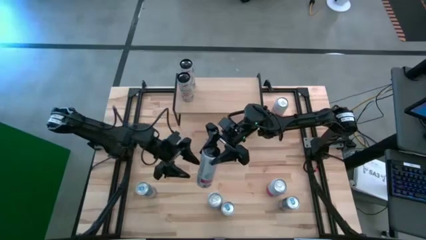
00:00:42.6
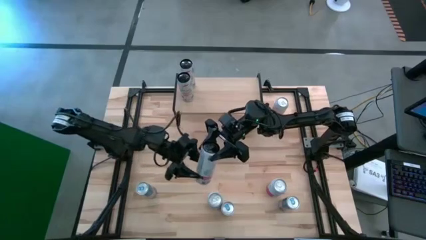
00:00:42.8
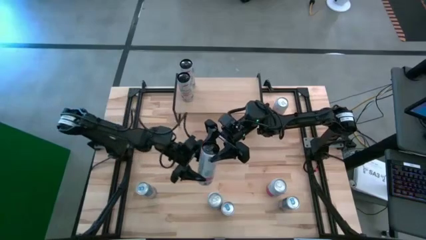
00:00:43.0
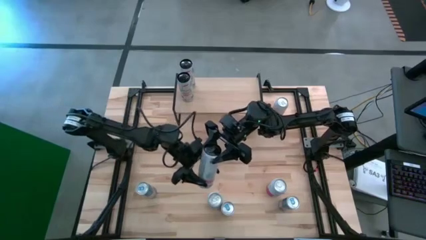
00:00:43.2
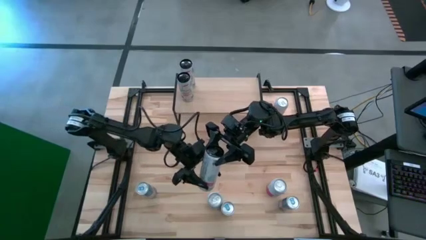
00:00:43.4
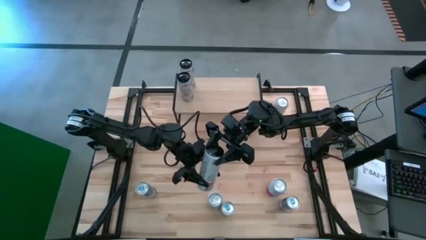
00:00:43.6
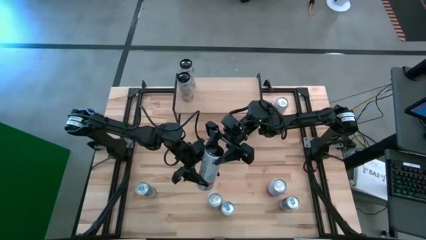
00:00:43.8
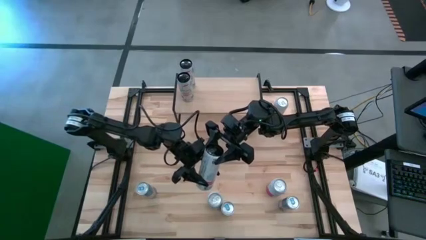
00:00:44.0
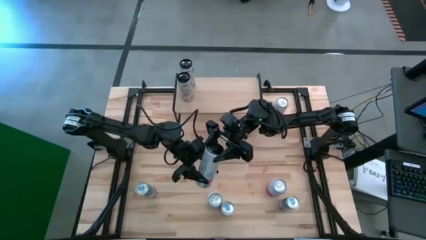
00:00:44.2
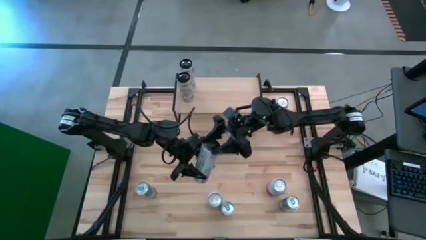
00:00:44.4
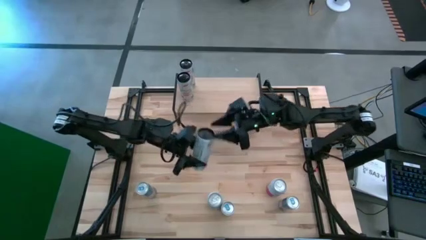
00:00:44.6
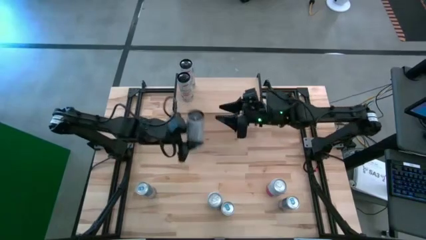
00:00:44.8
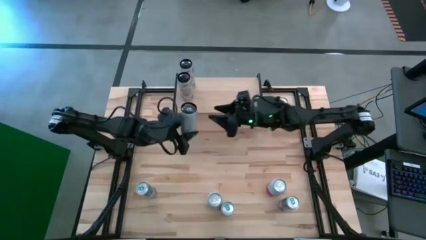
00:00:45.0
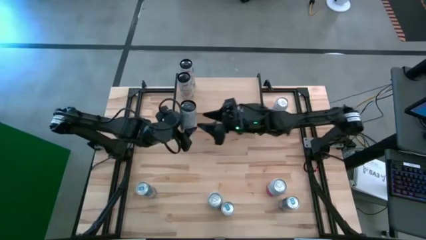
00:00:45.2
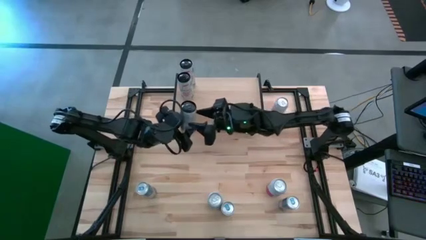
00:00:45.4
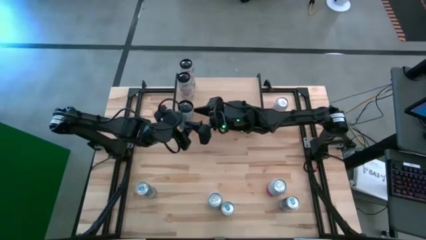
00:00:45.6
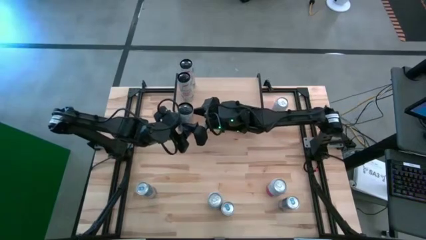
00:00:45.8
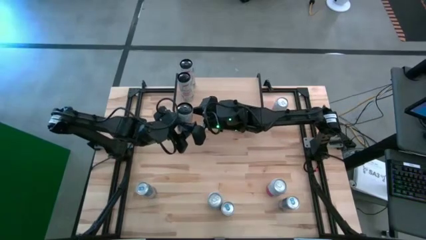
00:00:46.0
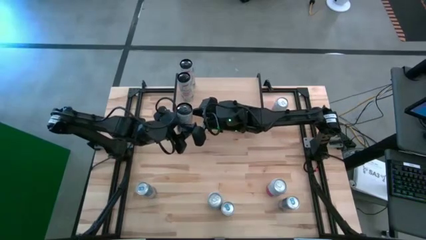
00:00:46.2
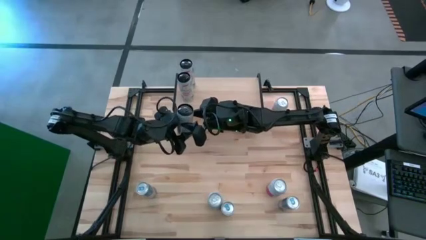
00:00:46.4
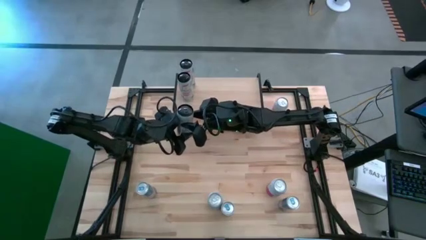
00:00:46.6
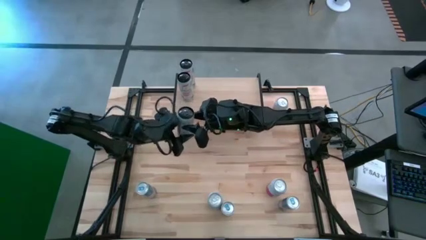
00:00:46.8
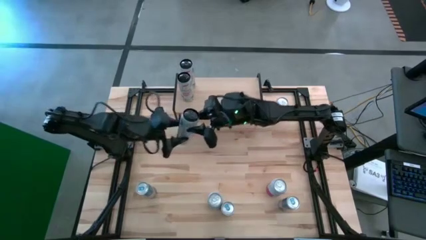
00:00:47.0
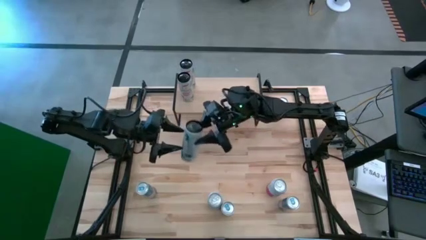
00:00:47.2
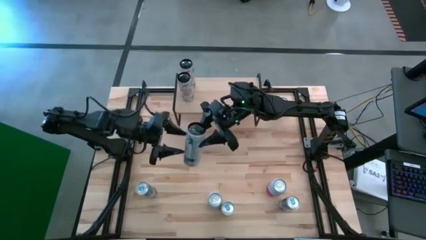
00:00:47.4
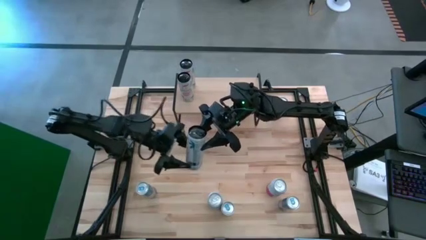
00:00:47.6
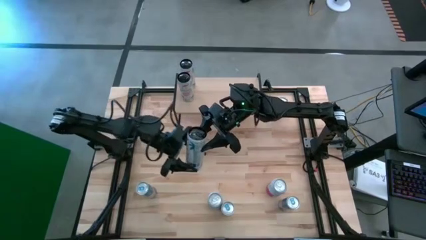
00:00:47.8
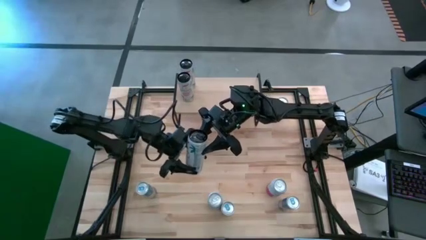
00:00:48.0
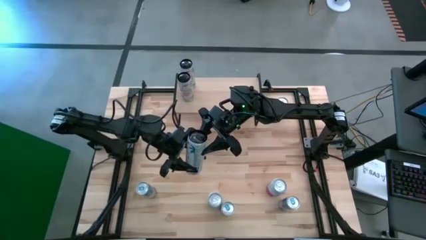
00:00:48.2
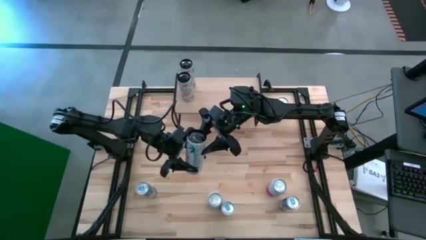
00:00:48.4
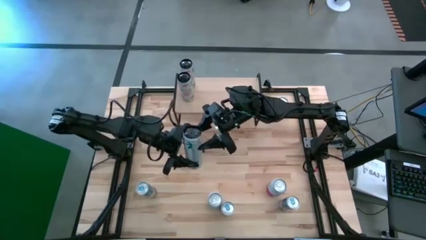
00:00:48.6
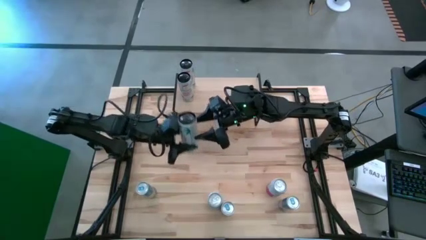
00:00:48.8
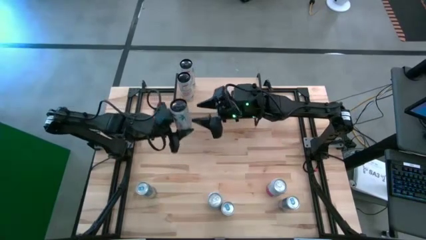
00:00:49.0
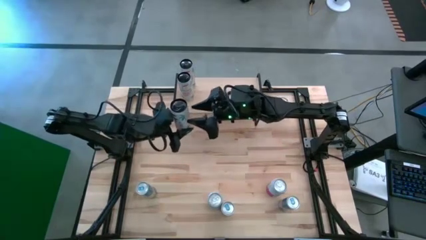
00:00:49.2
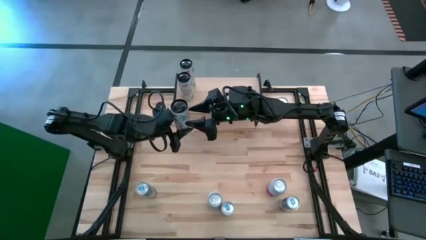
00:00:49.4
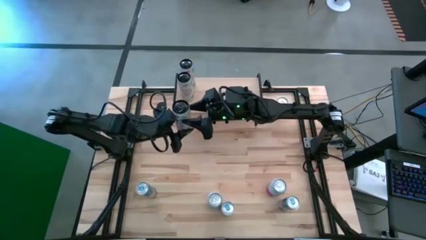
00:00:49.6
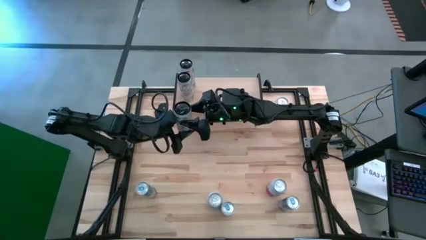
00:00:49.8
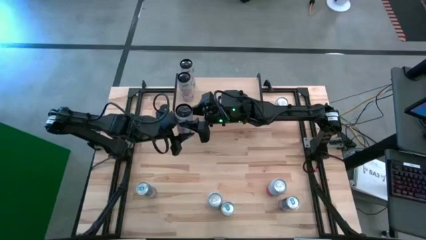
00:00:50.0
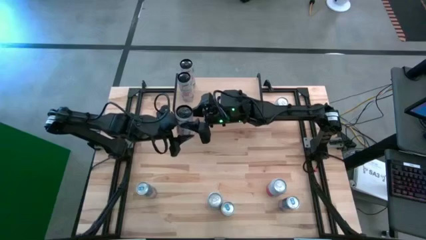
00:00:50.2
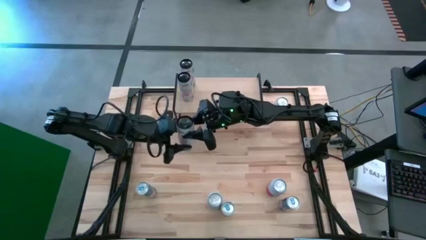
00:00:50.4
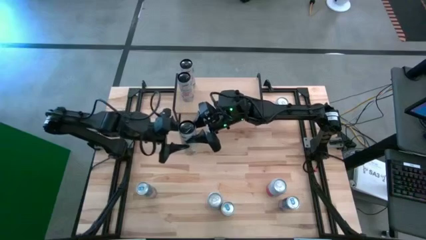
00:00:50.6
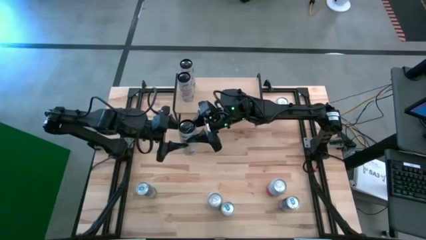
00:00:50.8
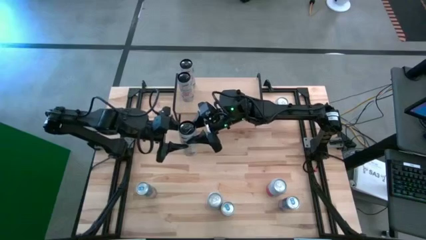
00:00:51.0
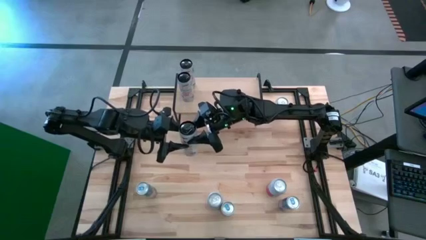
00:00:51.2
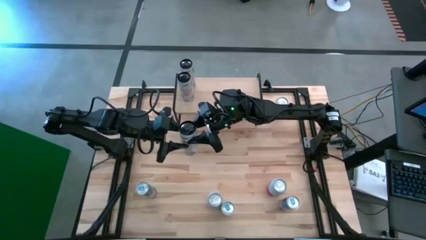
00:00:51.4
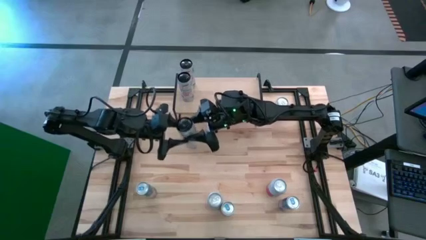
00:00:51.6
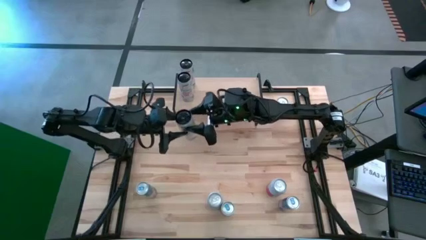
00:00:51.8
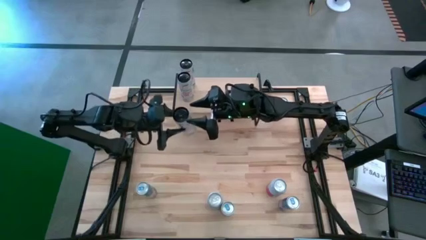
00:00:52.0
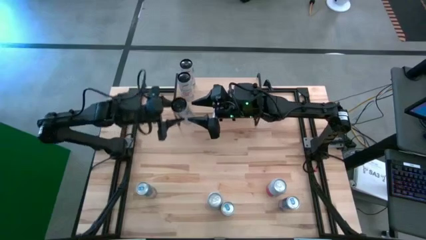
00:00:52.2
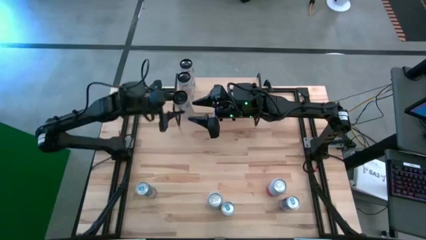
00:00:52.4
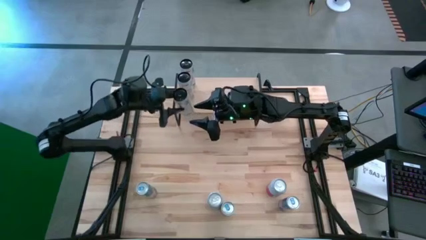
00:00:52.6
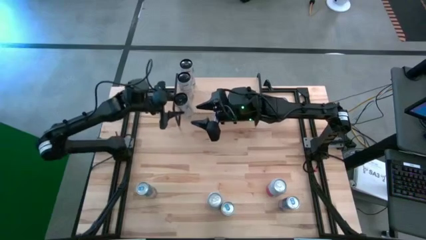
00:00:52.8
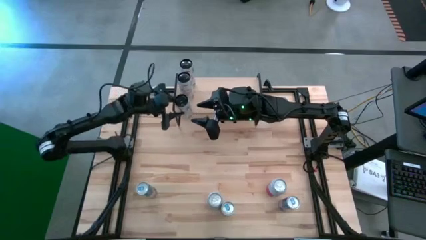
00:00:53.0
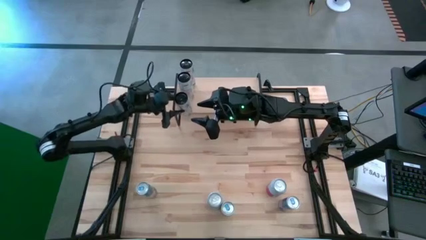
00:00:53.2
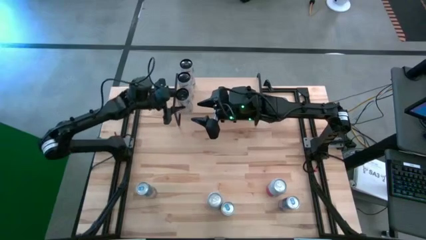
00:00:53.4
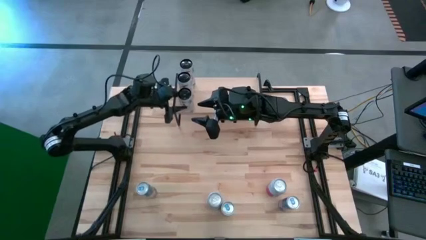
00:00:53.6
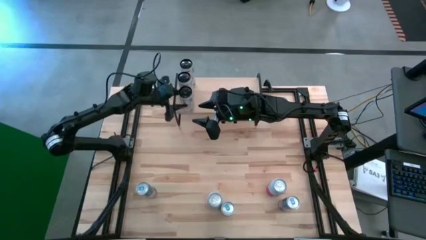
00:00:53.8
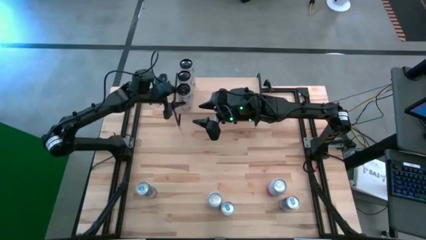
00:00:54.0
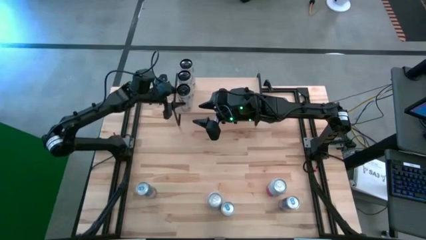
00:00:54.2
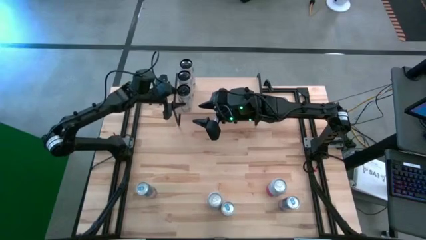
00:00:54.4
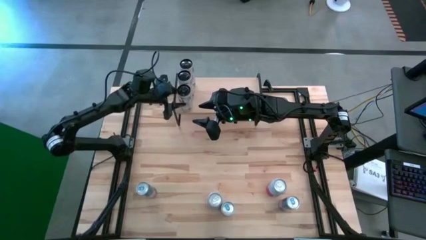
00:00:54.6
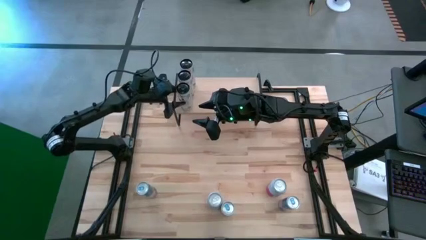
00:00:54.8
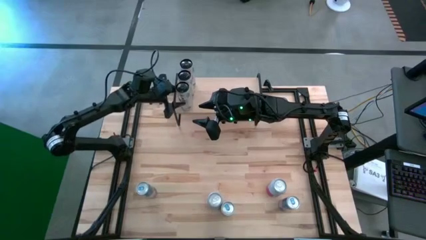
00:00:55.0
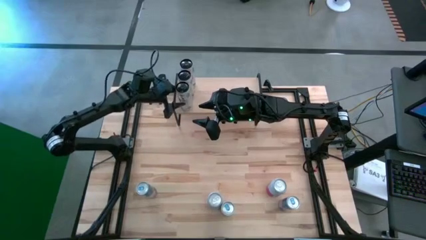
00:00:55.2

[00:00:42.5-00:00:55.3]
Task: Place canned beverage on shelf
Put the white-pink soda can on the shelf aligned with the other white-pink soda cans
